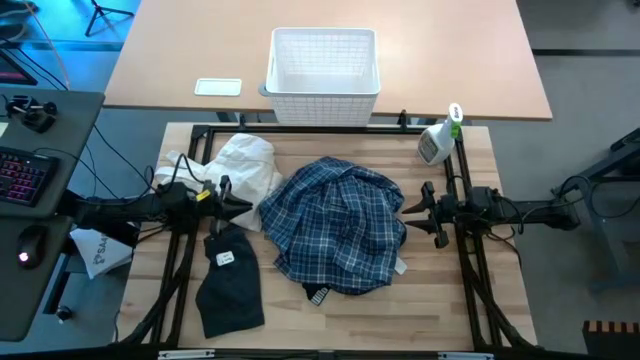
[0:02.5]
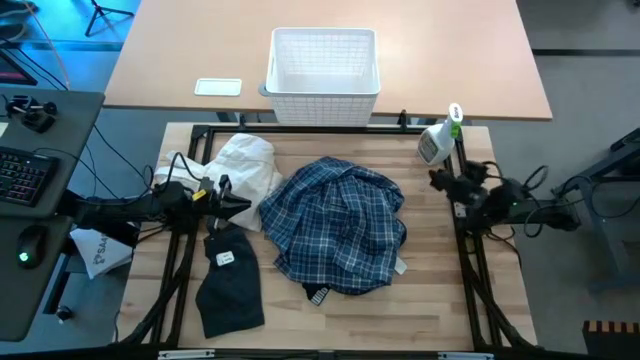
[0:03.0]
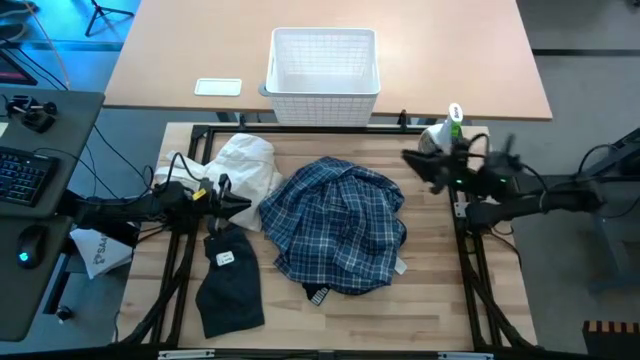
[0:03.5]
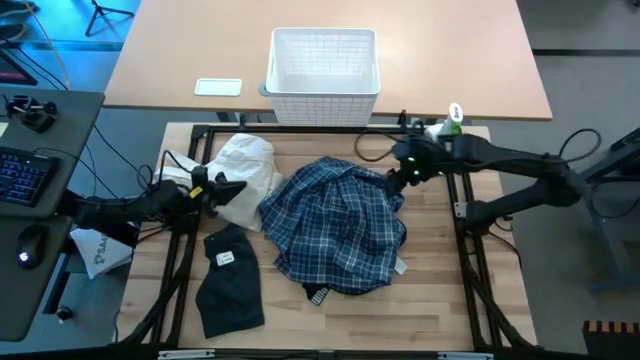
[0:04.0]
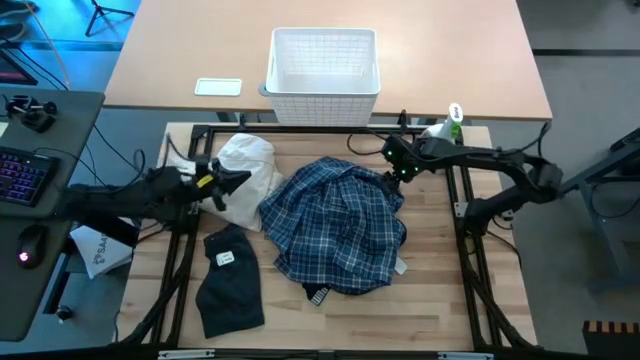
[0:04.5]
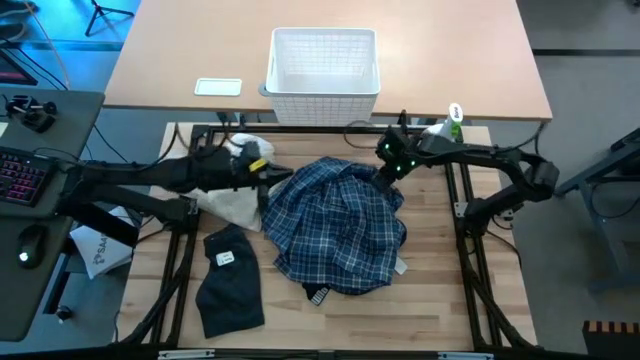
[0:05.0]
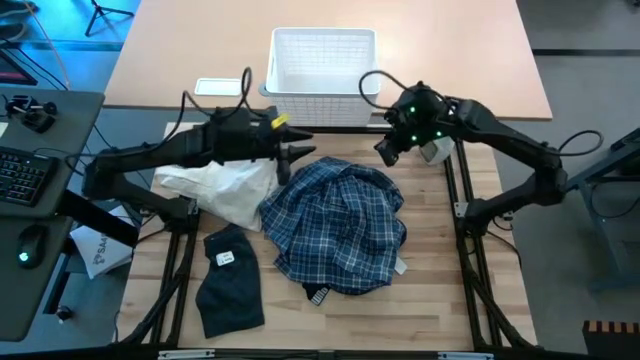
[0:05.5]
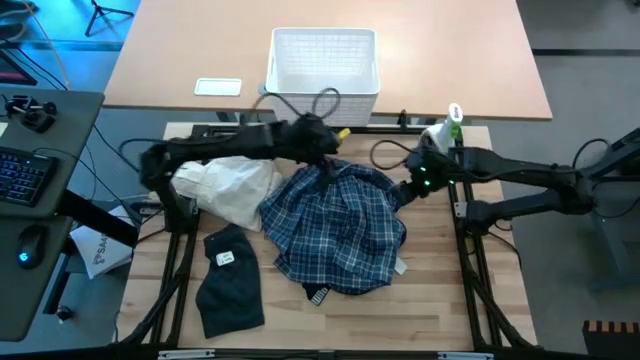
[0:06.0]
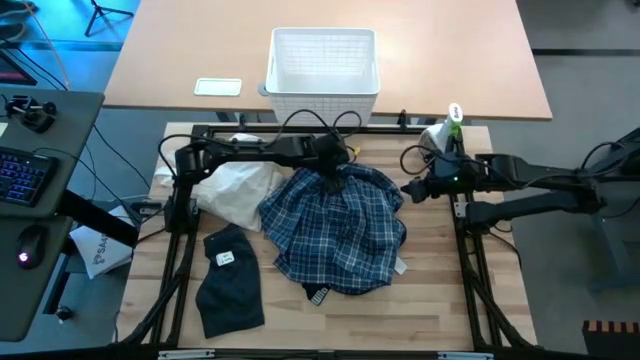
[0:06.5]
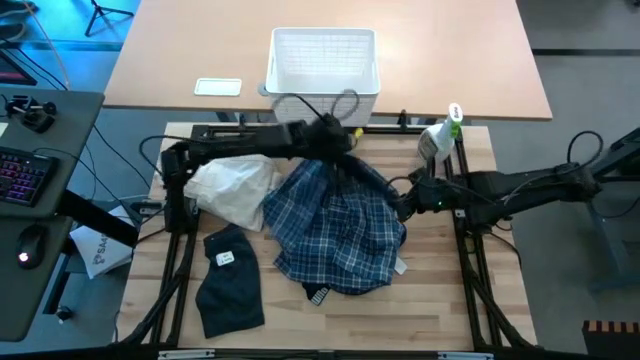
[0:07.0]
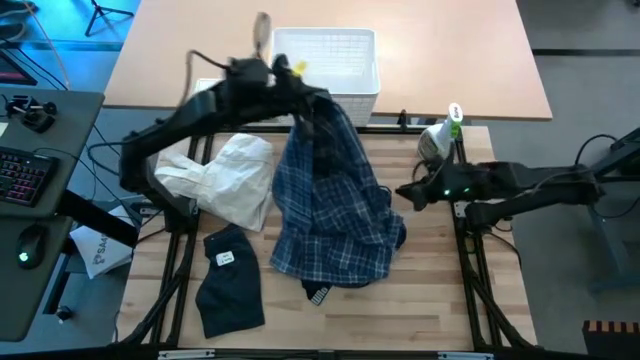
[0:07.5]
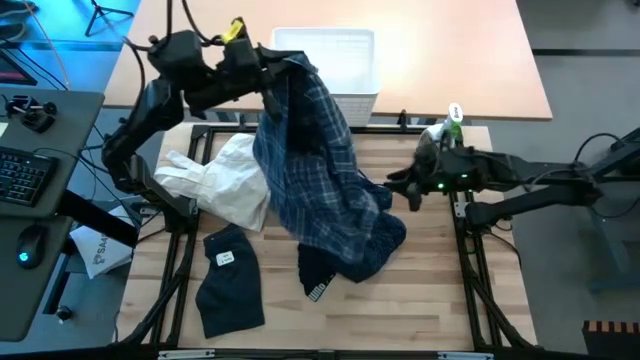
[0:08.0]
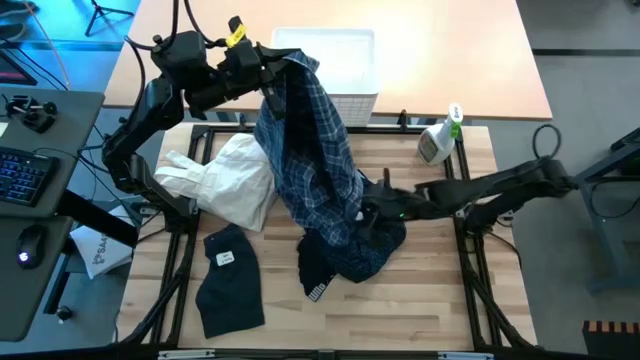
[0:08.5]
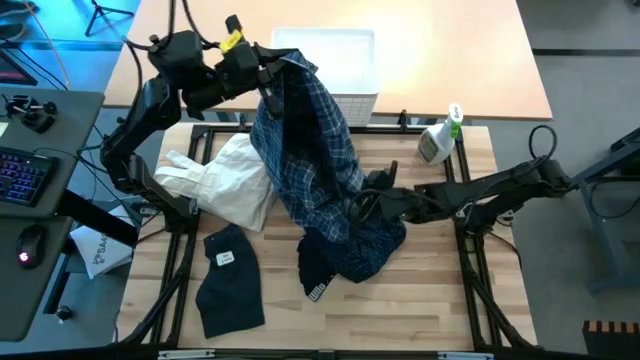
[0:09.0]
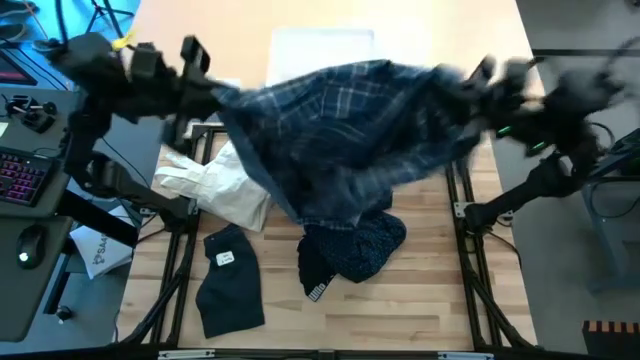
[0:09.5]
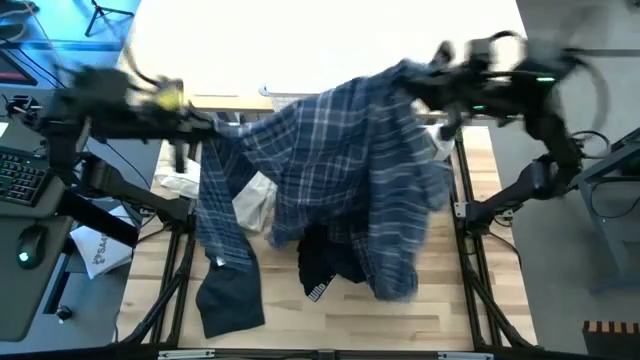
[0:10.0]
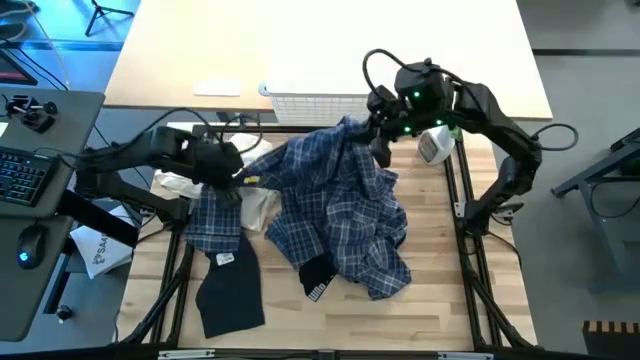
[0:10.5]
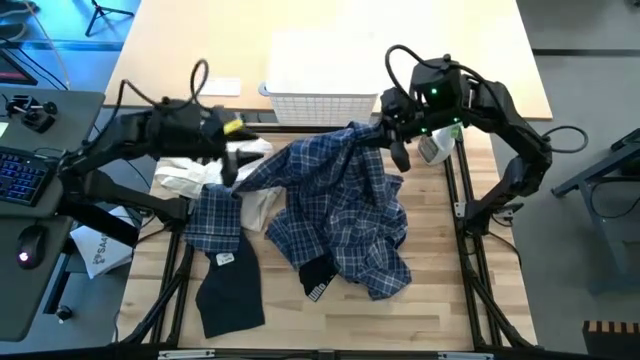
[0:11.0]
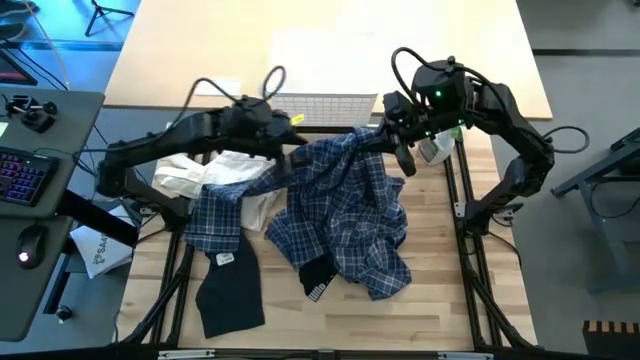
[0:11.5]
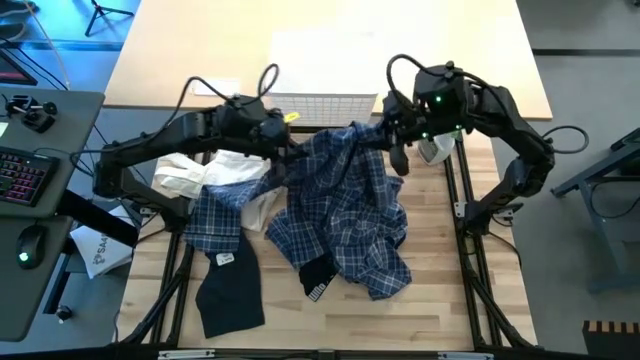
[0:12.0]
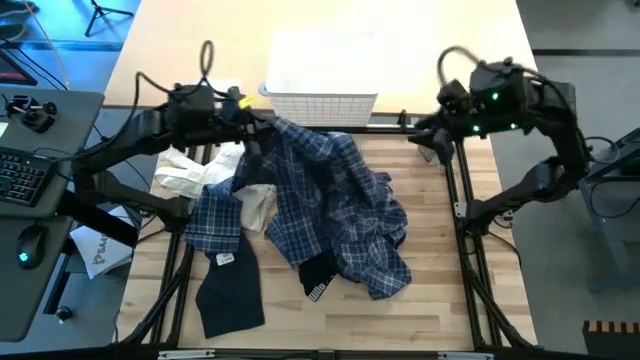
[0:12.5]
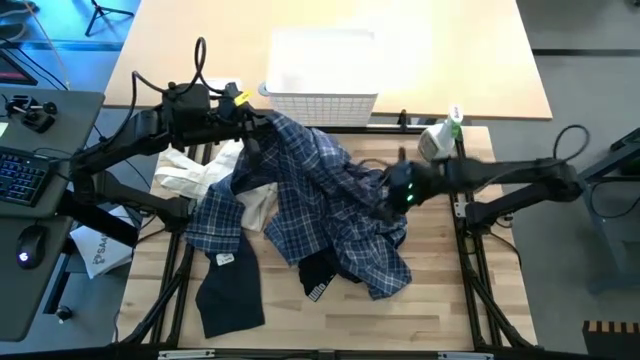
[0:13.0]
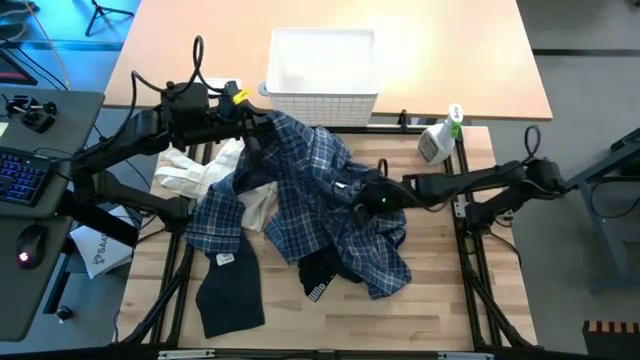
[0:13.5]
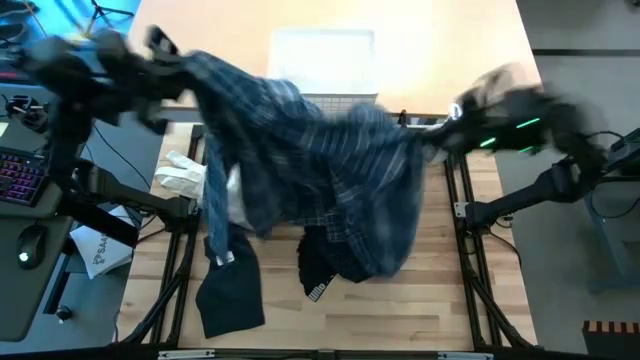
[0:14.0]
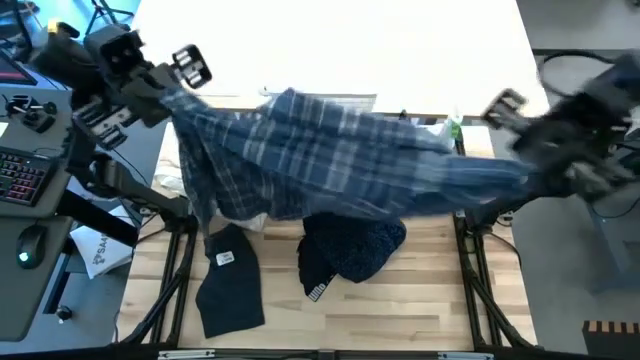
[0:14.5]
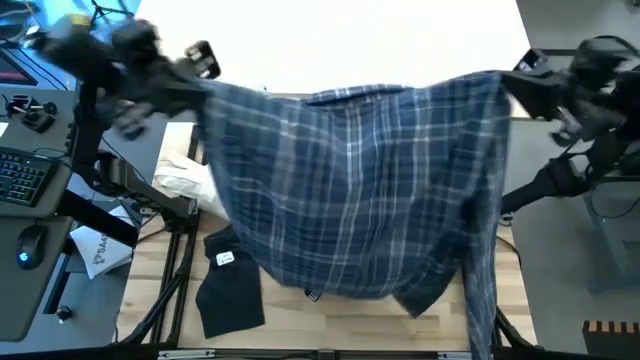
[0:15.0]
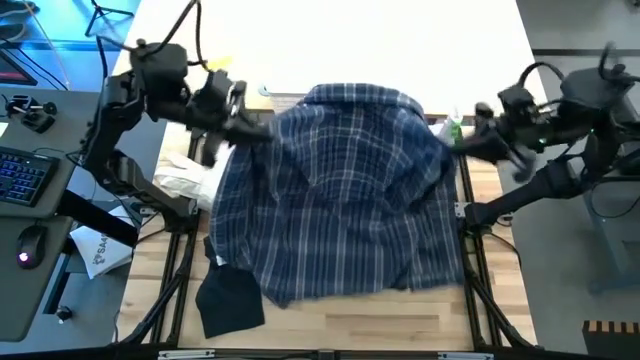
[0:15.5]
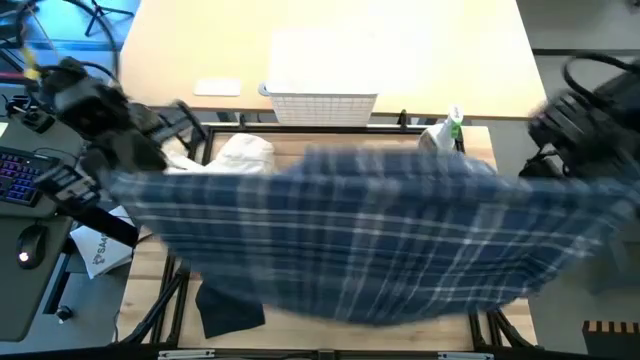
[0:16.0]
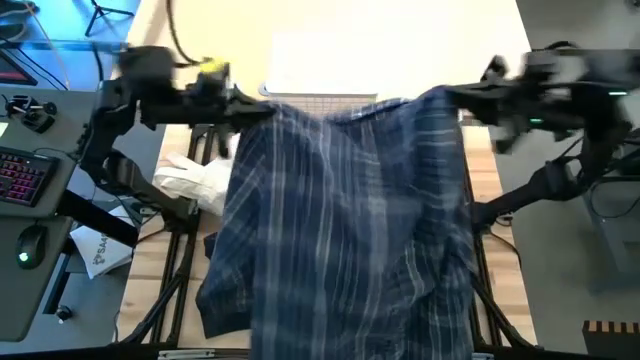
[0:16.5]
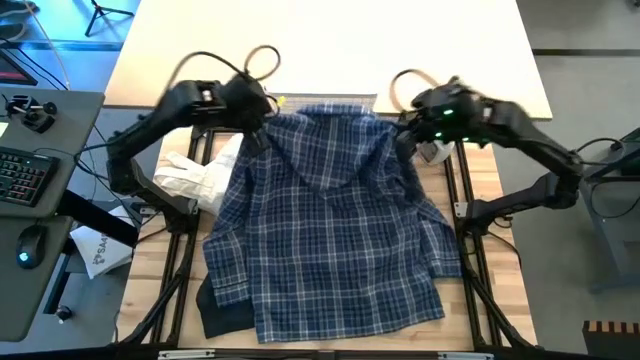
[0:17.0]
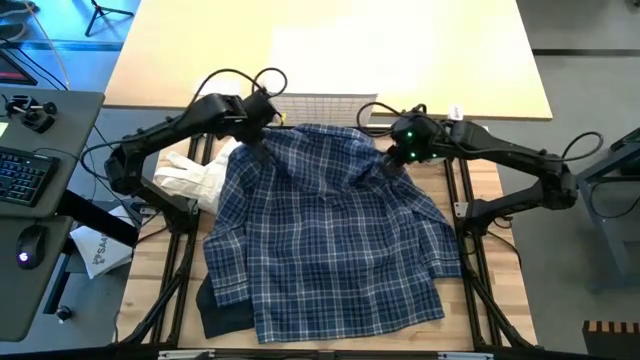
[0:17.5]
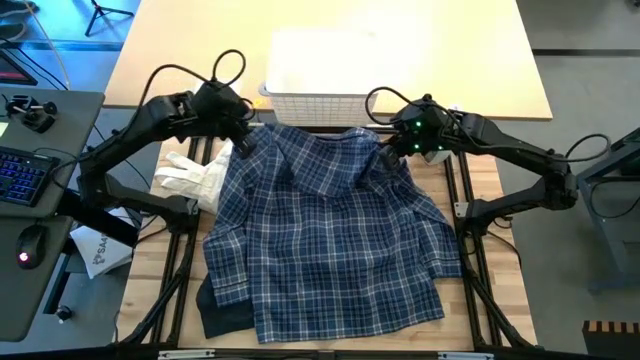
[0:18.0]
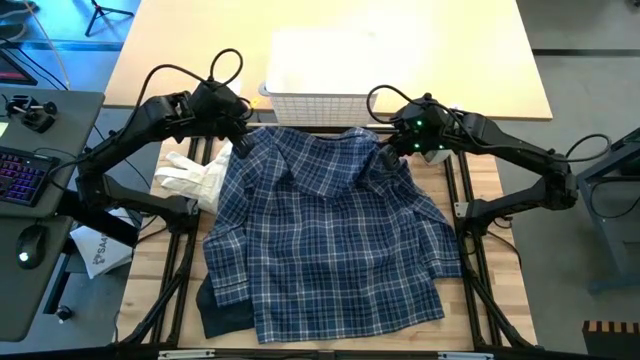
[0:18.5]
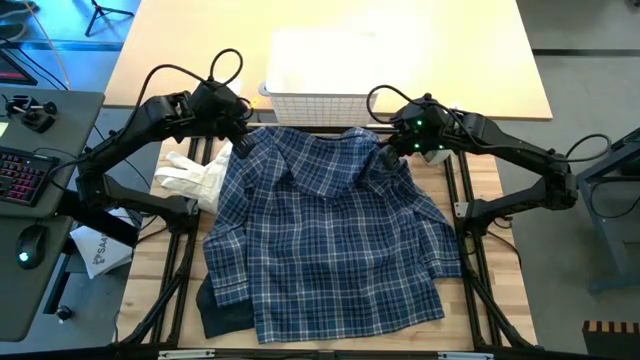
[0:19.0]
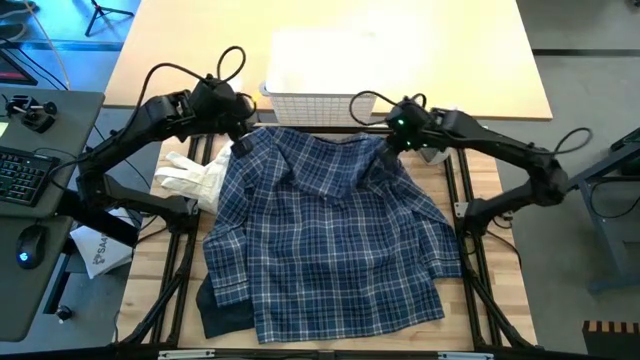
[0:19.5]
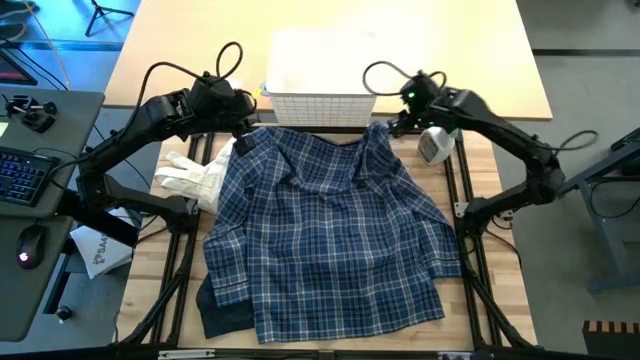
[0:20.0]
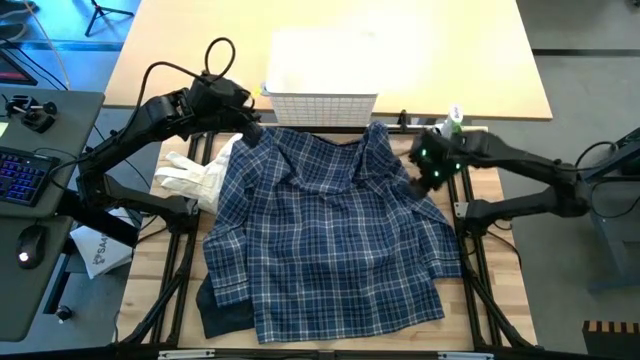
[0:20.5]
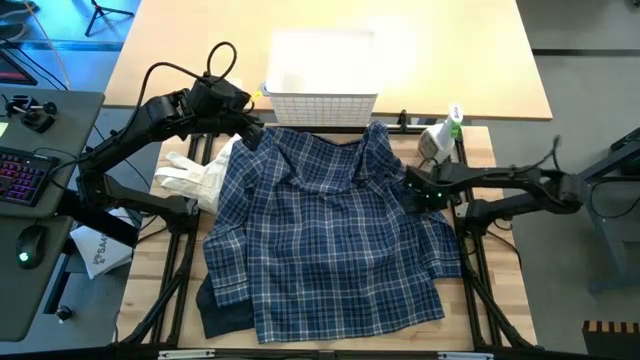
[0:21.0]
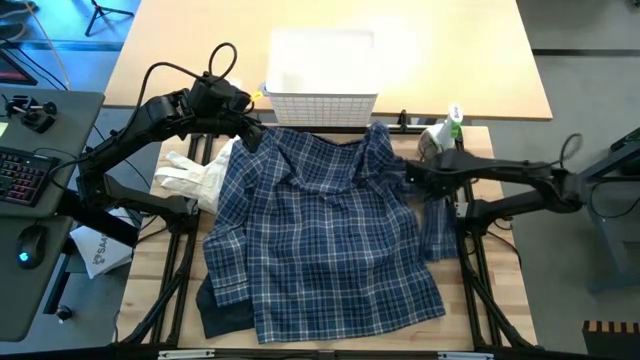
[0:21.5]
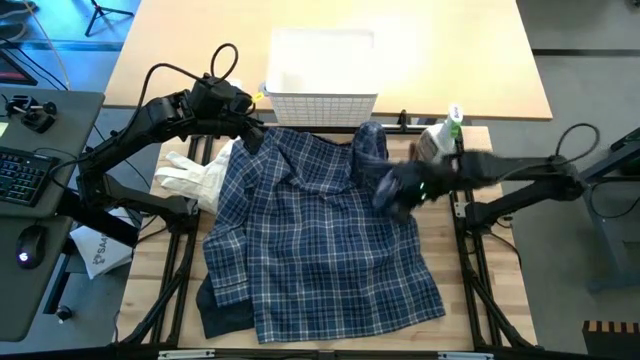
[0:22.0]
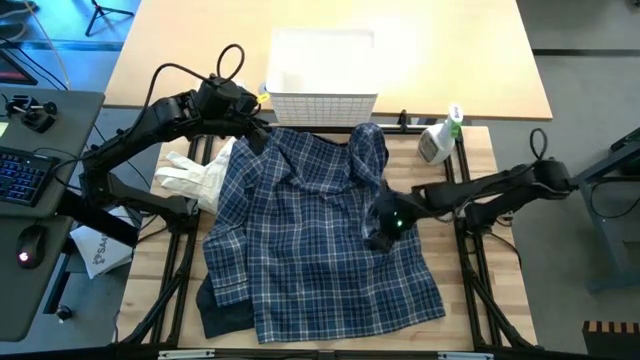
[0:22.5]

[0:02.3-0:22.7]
Task: Fold laundry
Fold the blue plaid flannel shirt
